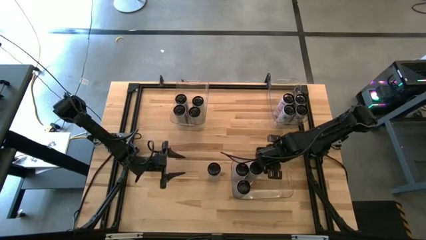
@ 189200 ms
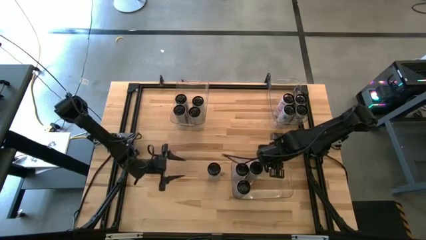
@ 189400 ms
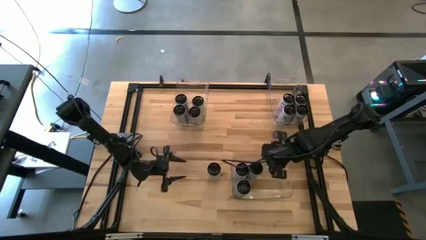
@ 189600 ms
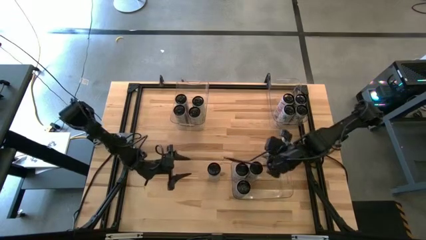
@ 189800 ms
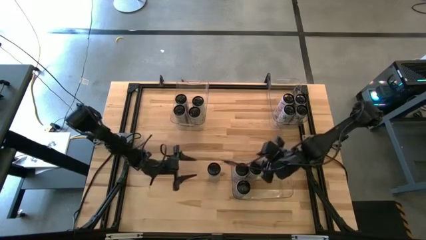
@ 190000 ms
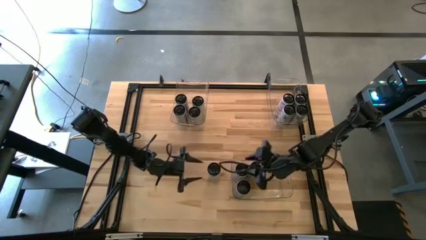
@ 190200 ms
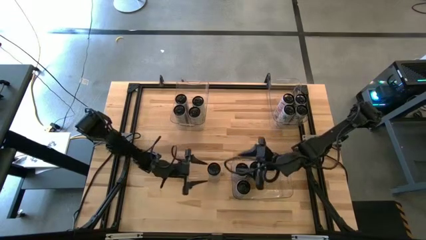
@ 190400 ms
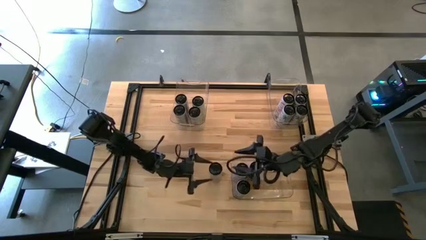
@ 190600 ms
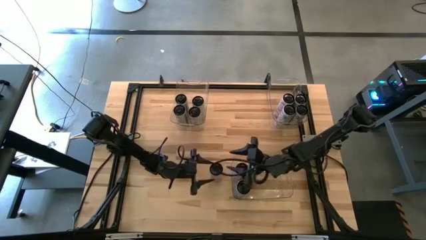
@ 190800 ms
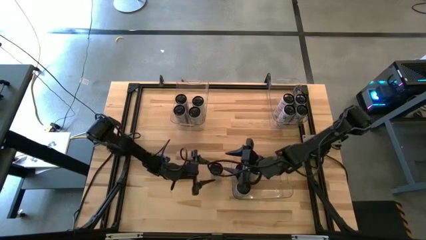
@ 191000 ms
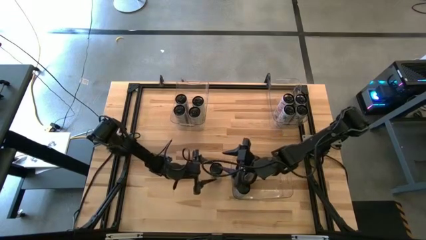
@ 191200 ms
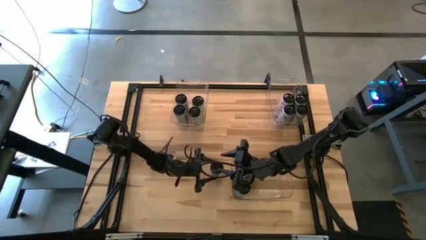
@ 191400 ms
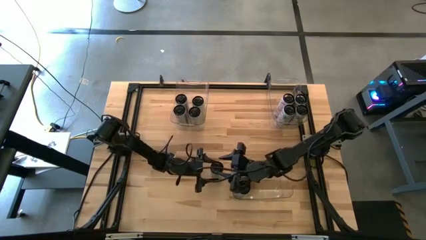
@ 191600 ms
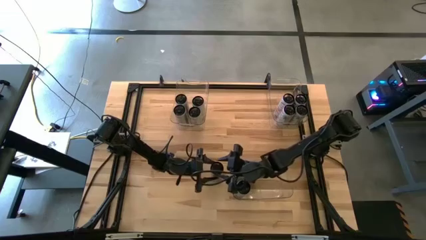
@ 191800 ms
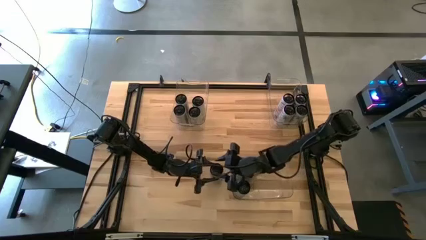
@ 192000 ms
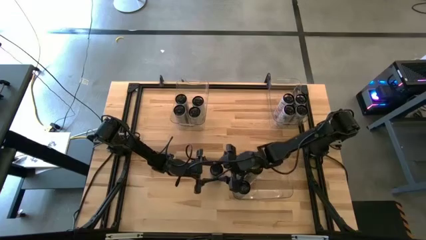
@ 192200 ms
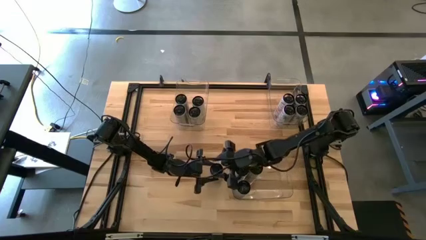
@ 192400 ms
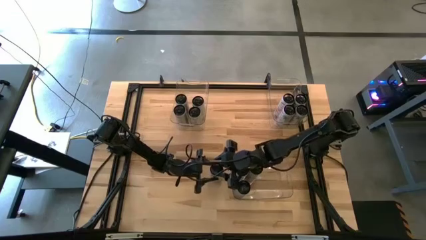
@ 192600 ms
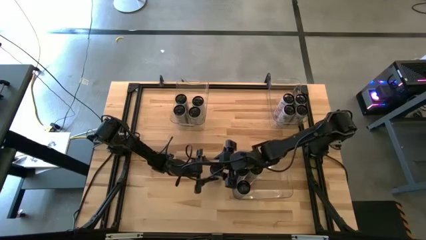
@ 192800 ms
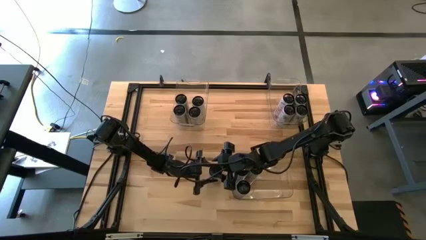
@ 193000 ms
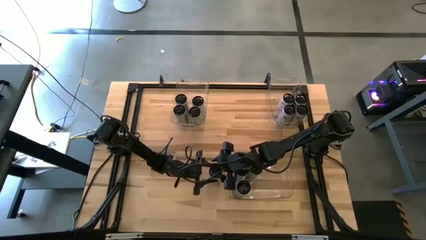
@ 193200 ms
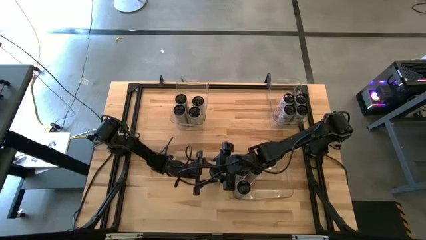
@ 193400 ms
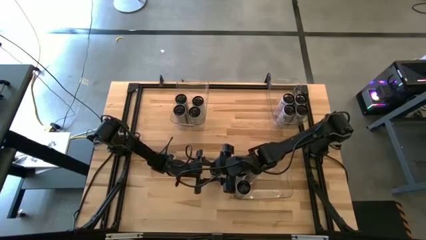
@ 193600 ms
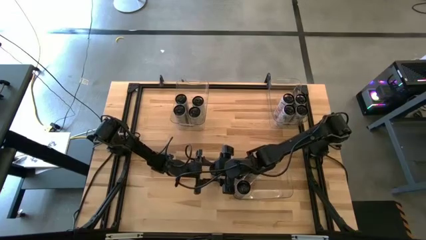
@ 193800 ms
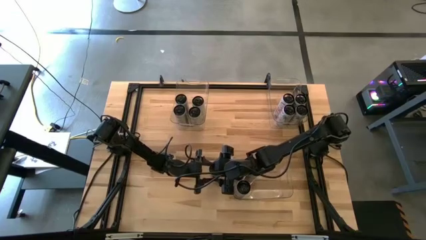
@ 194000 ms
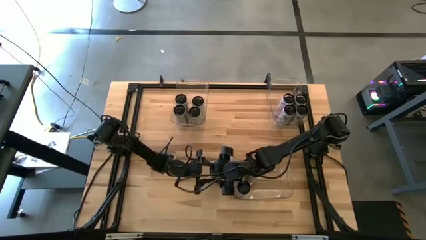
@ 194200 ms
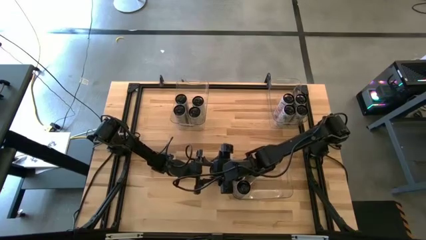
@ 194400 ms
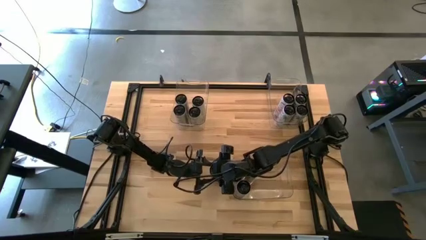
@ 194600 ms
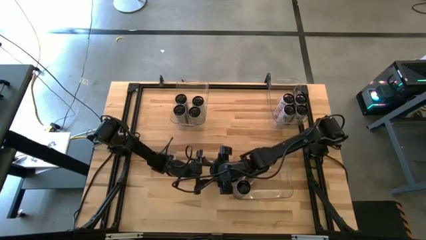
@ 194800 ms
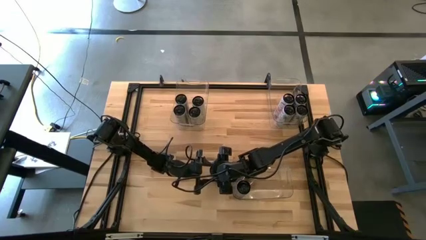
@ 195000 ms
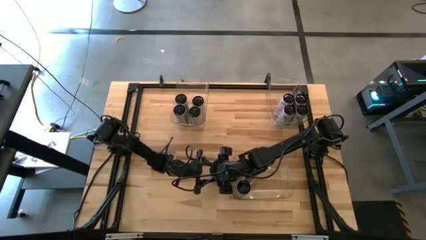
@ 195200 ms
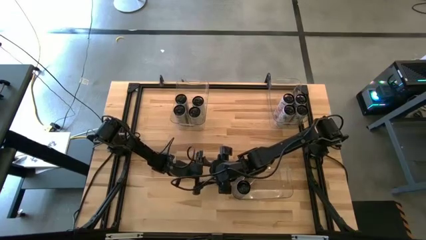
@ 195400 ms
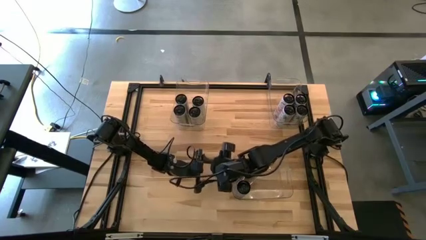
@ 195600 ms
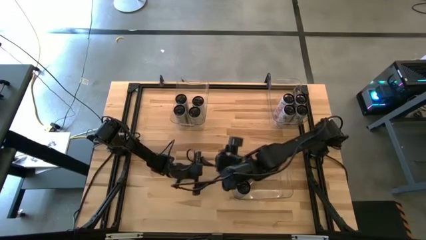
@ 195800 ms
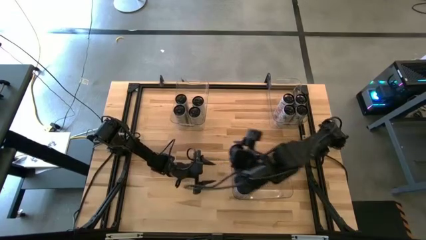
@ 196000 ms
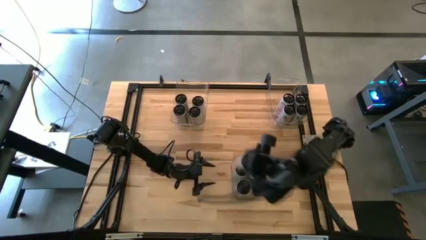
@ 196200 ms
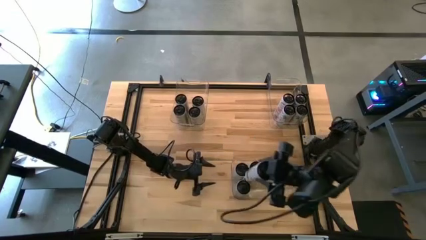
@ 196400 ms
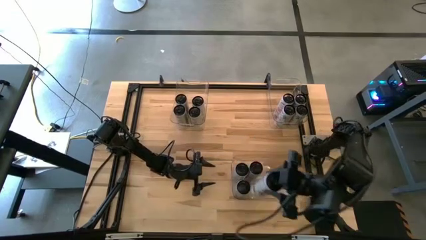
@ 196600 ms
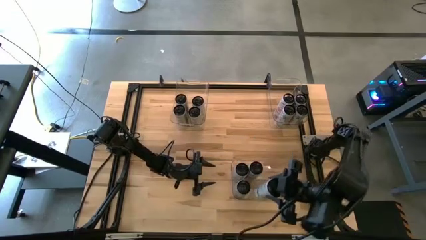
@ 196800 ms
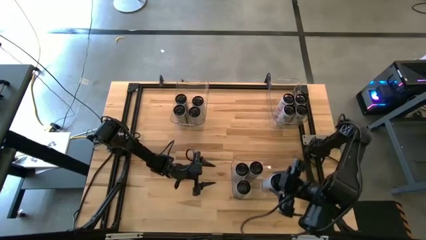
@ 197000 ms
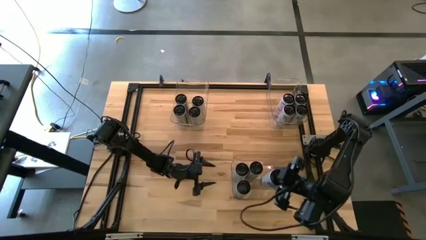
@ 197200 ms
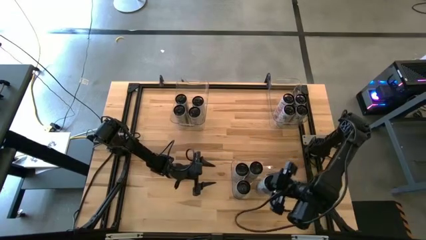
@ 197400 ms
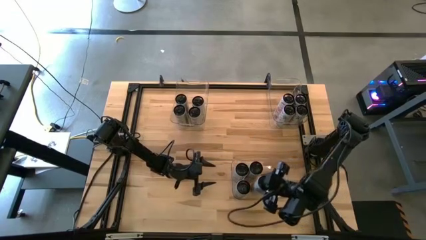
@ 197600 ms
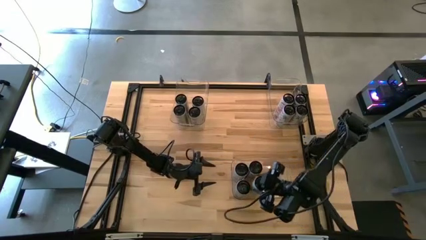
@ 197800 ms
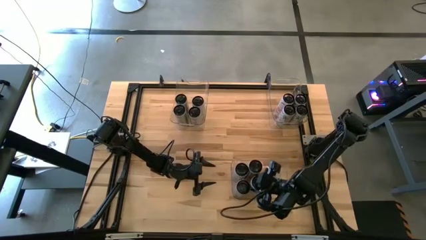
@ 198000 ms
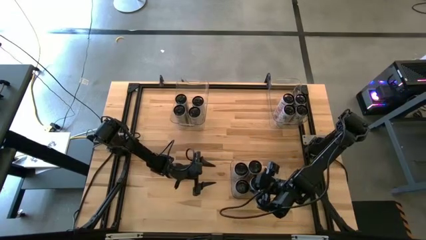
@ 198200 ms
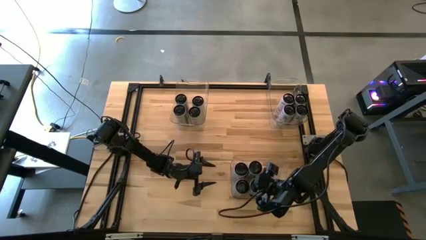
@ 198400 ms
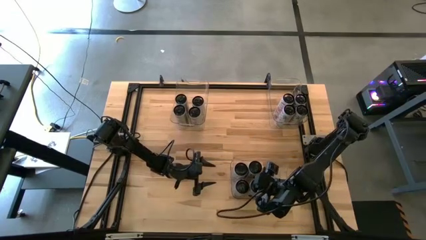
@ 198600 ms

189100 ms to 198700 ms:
Task: Sort soda cans
Put the white/blue soda can into the bottom right transparent bin

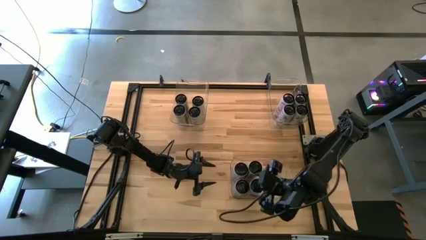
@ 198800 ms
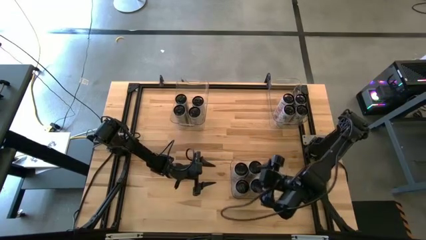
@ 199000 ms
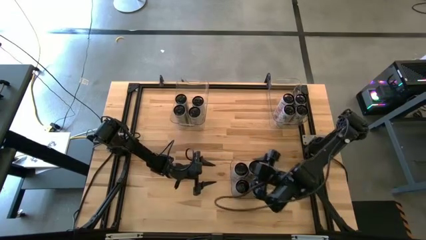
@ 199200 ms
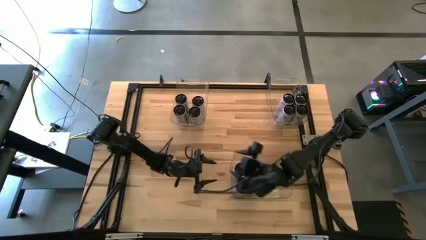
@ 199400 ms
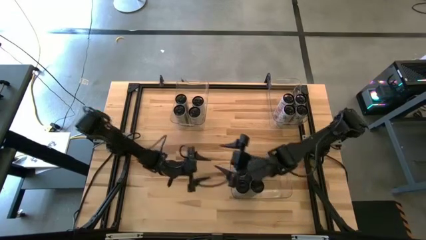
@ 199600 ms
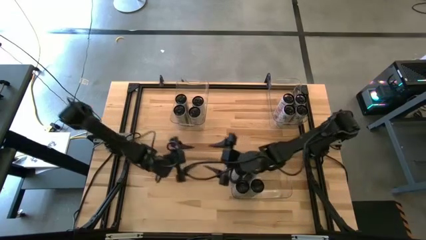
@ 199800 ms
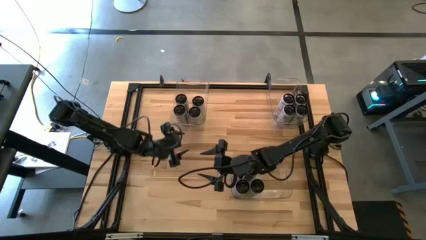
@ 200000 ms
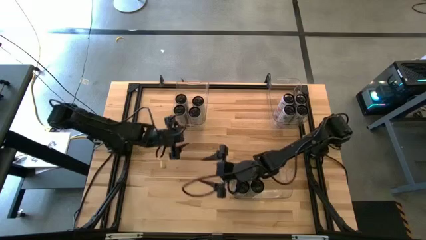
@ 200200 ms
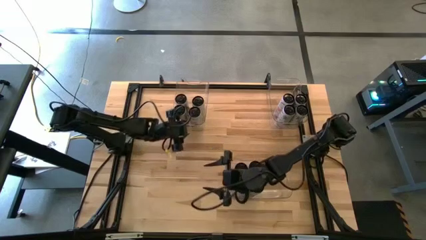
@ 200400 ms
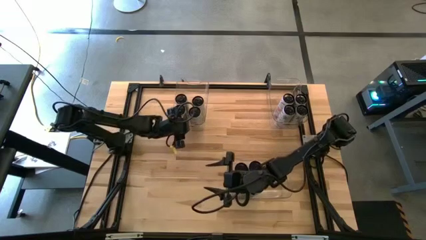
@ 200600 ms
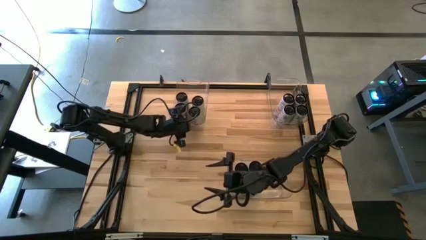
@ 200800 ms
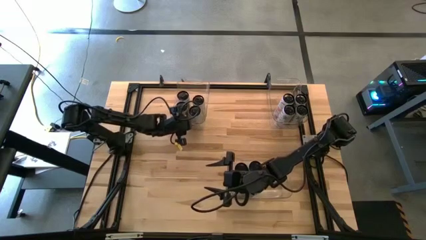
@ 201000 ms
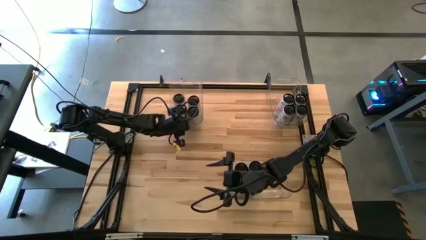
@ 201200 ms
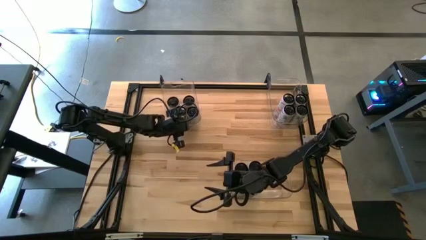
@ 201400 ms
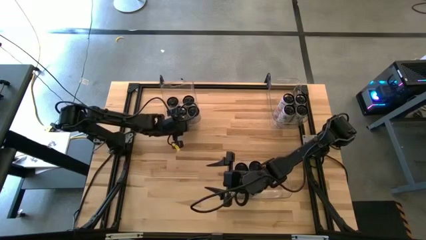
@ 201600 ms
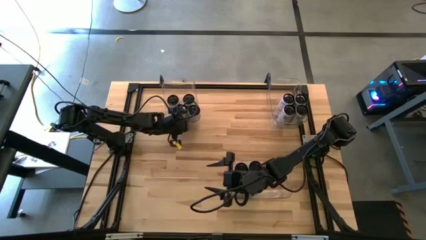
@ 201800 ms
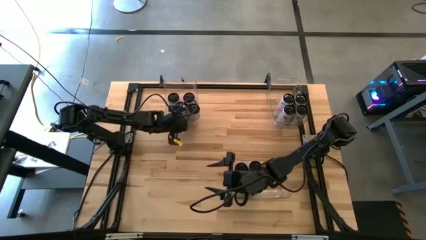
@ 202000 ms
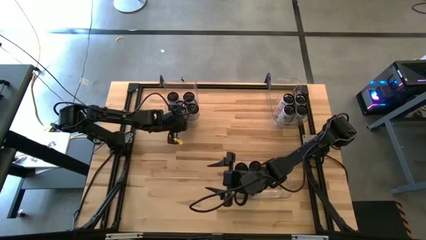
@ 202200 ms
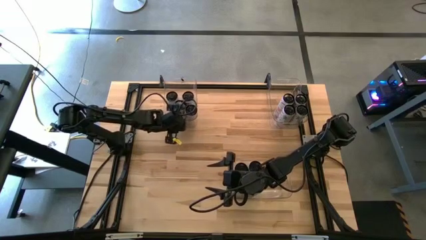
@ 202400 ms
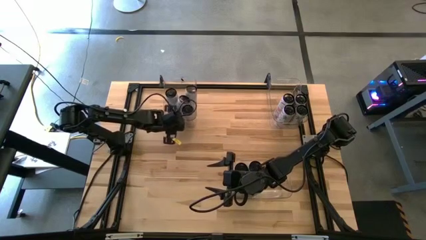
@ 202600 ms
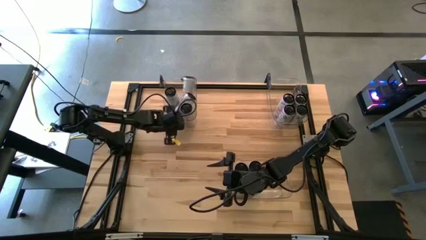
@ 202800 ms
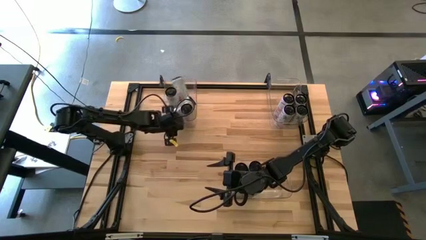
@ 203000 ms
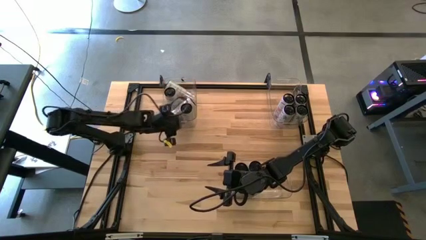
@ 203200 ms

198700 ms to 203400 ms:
Adjust the top left transparent bin
